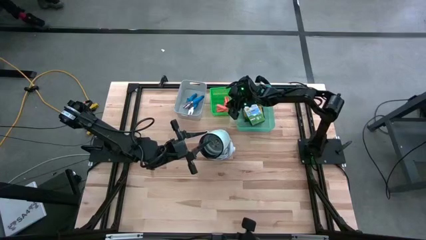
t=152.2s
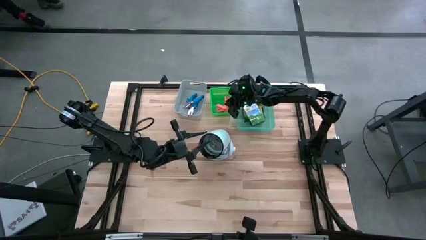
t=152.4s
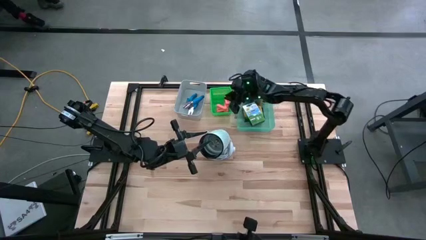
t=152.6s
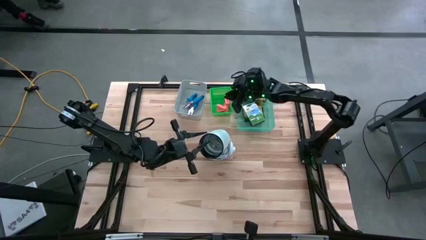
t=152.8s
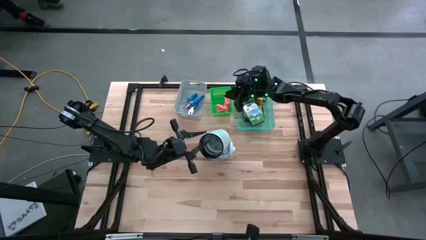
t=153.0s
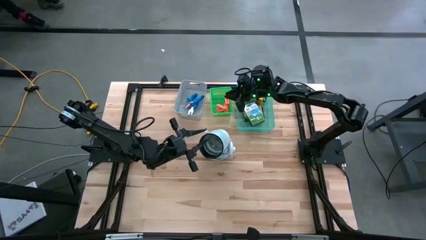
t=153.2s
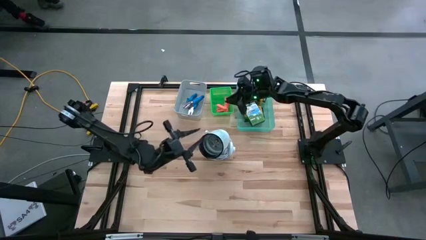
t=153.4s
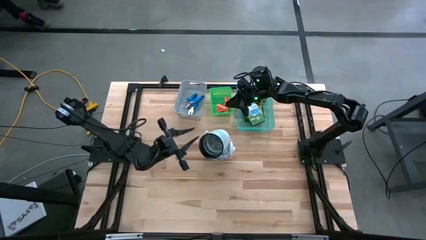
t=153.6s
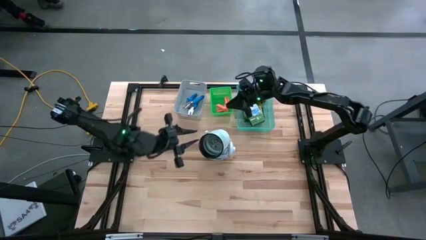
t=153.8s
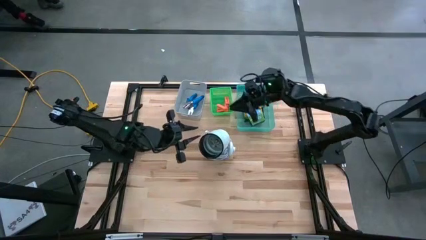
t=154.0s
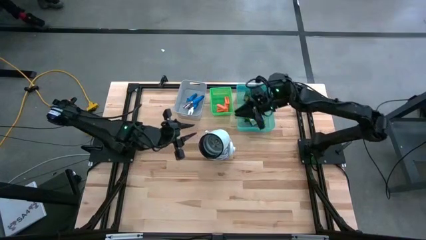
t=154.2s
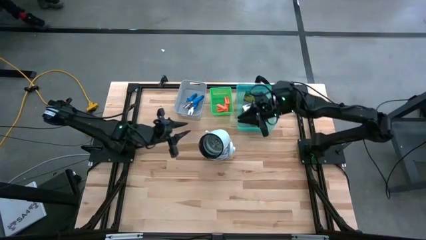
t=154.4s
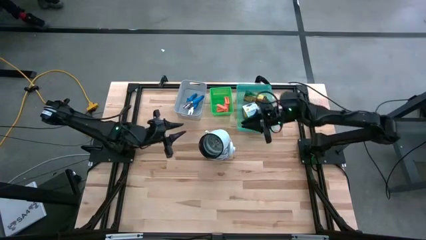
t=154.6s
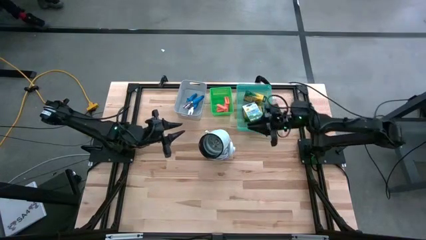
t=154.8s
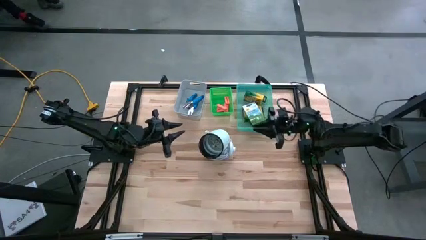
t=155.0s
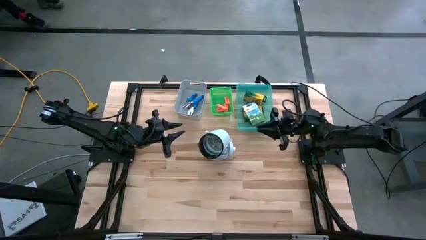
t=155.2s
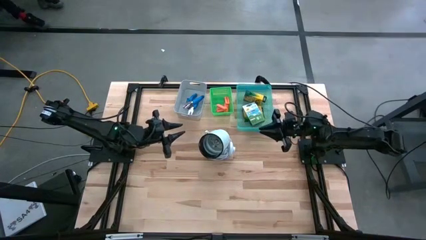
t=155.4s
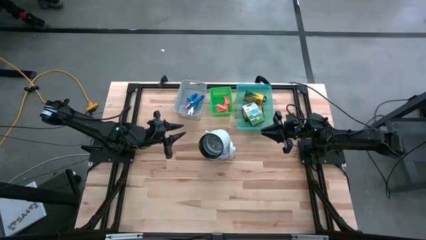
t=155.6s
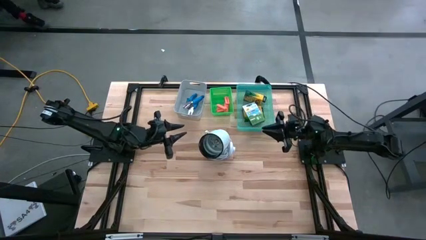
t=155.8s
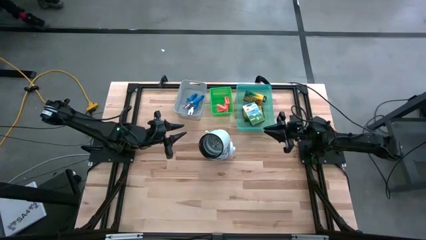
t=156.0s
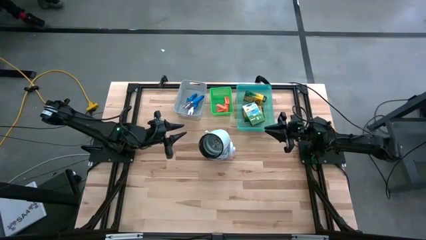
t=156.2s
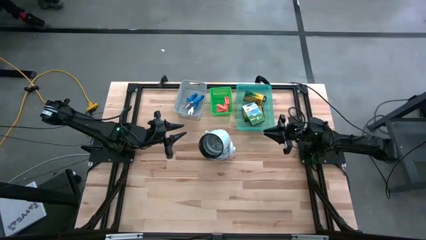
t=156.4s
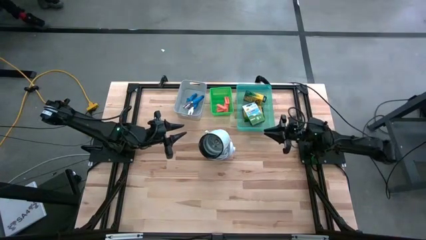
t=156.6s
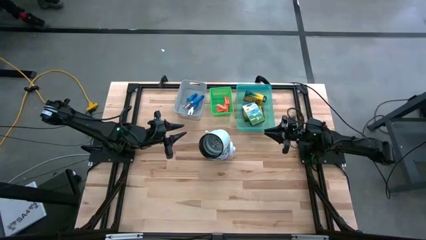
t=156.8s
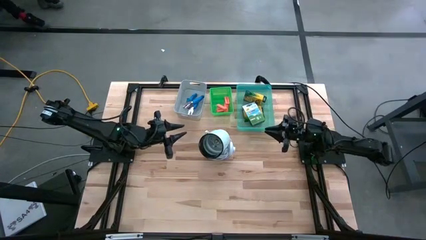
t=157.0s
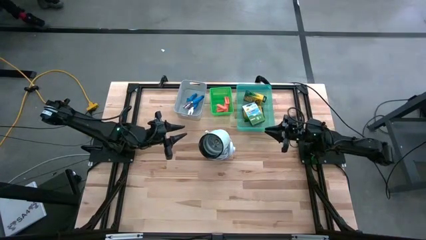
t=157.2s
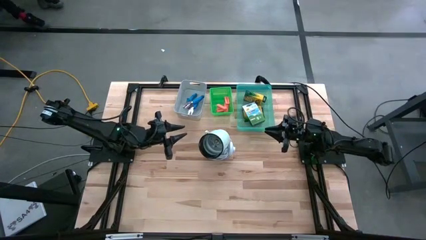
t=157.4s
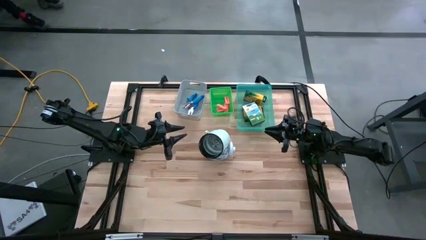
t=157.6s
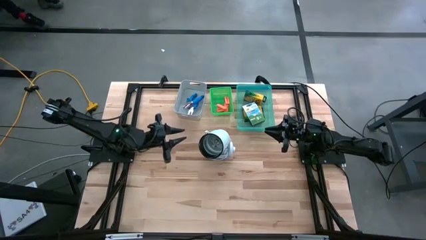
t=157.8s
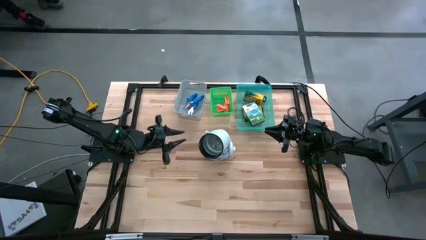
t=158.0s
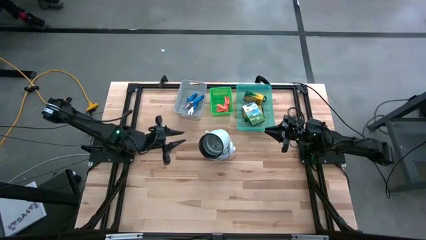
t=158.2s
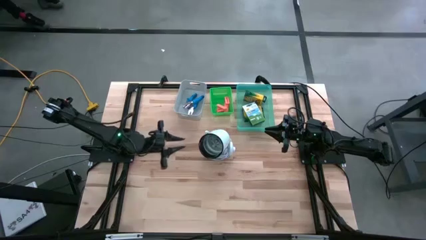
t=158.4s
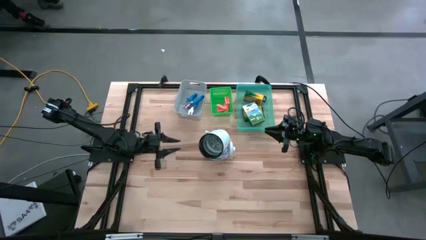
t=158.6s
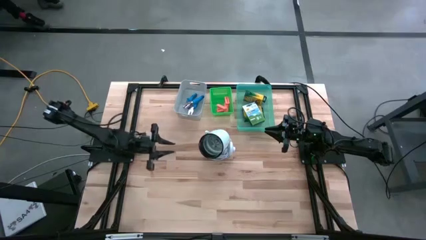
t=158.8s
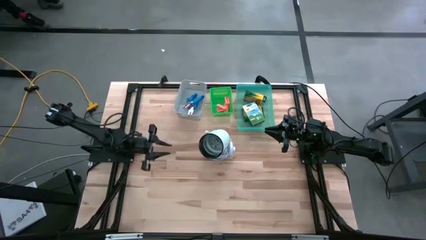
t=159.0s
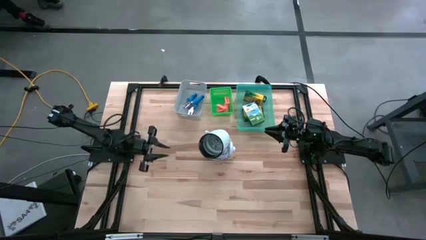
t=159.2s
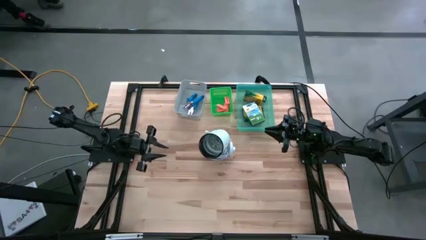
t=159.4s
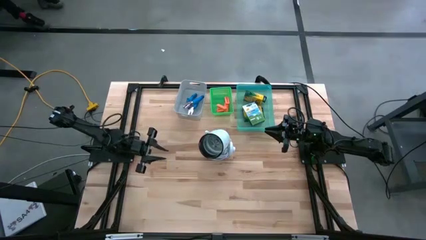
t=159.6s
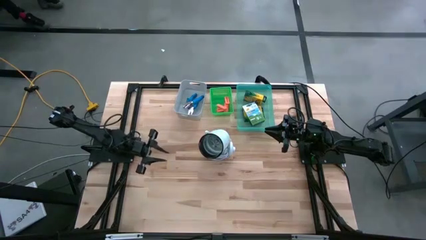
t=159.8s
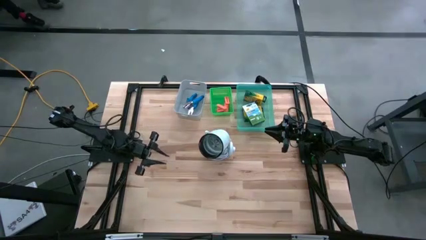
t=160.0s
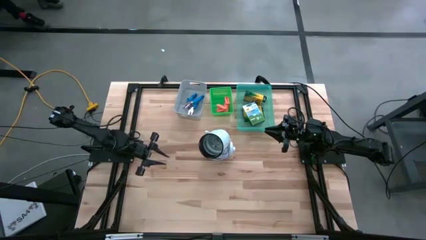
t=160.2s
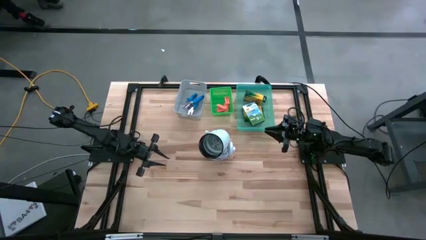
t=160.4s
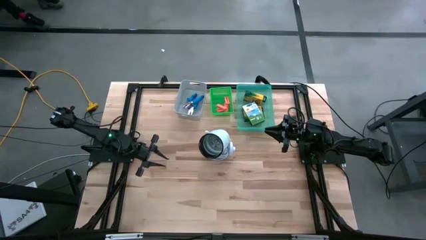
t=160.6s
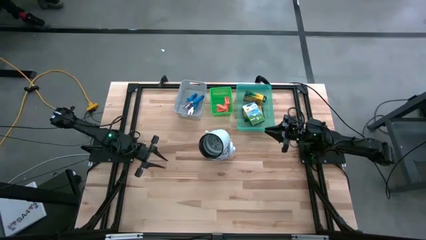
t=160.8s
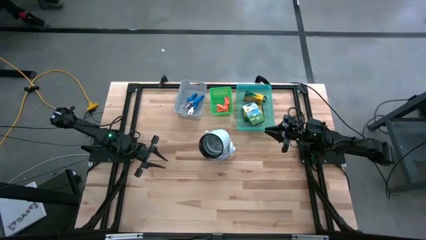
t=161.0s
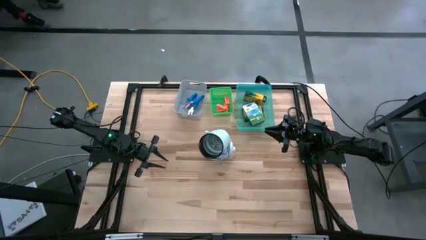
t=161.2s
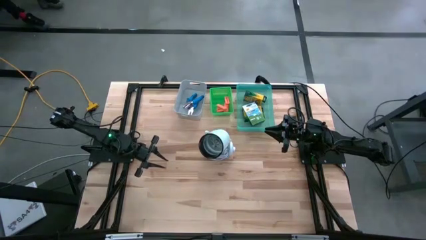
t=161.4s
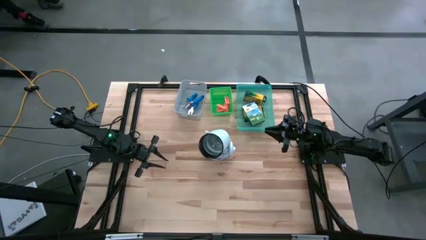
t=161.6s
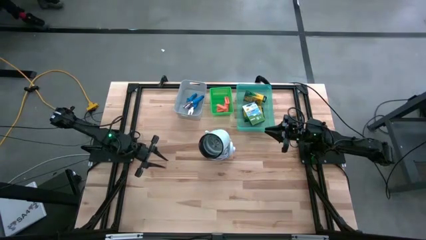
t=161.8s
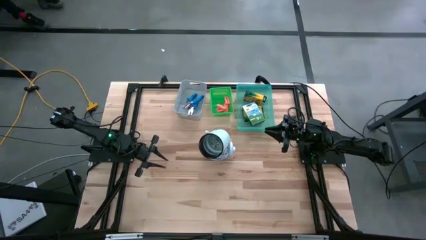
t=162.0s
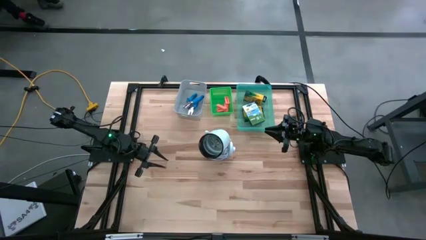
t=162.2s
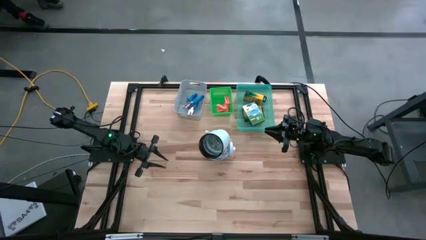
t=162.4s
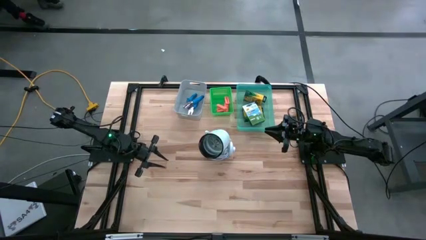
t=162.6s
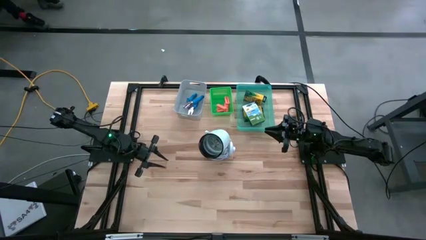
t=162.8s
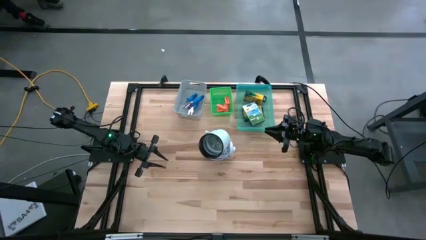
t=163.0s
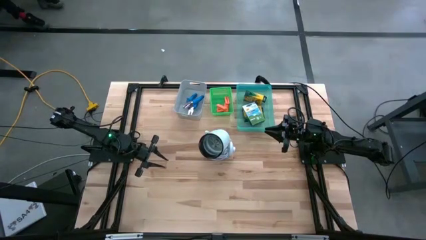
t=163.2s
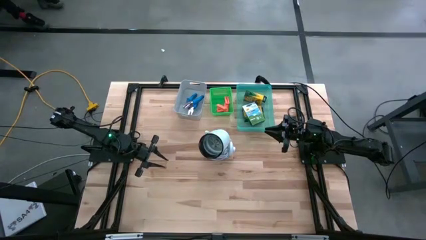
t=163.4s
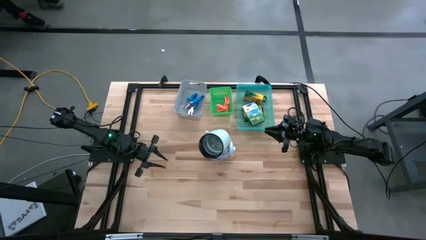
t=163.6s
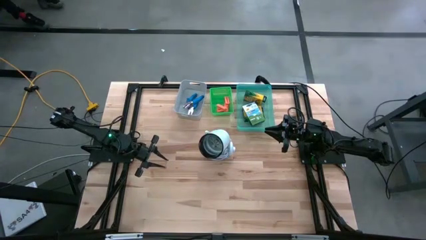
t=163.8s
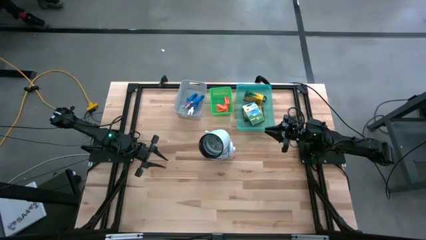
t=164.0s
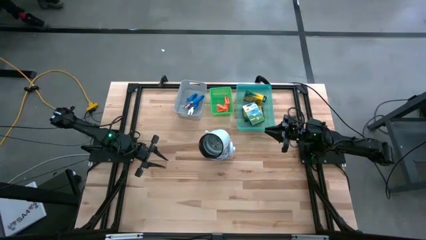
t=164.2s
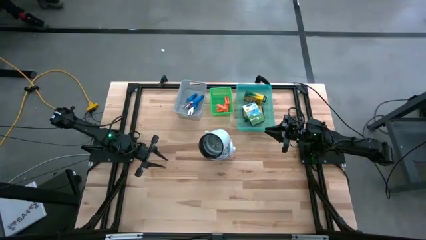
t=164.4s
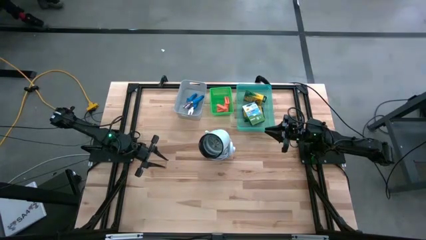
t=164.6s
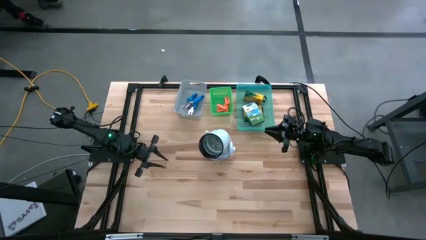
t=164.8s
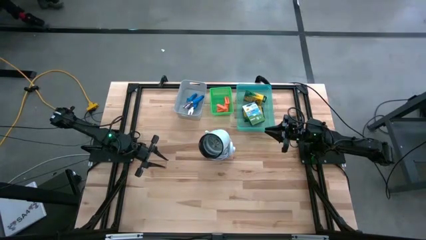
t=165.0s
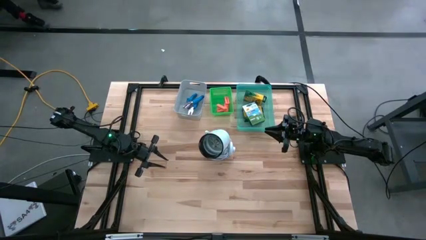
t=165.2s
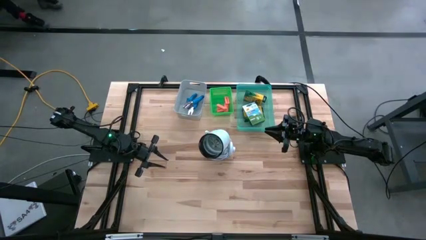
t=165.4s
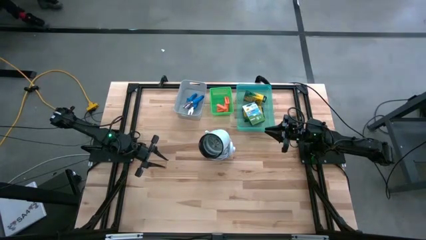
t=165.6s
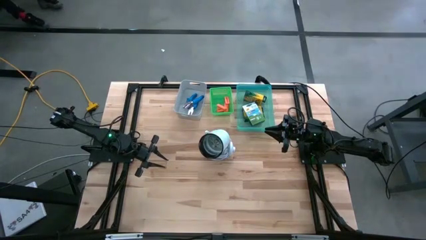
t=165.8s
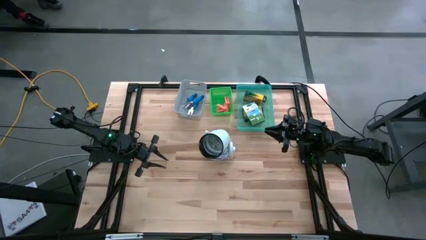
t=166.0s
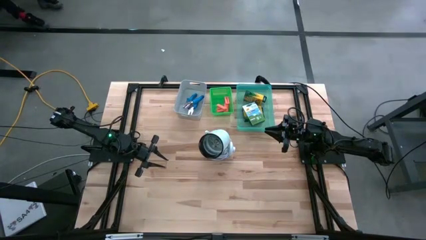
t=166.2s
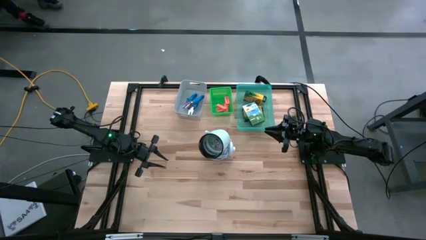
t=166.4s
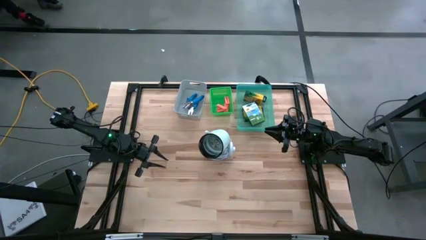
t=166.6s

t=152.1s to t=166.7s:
Task: Pick & Place School Supplies
Return to Home Position

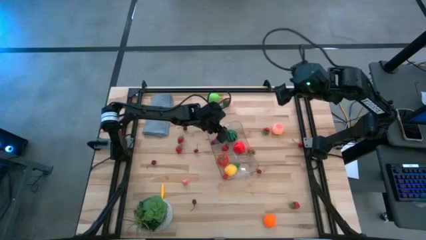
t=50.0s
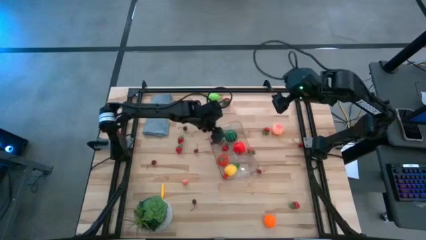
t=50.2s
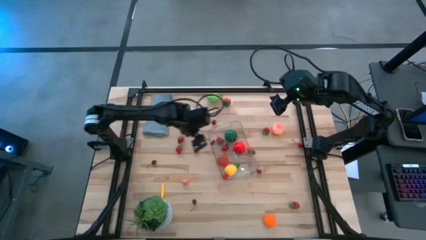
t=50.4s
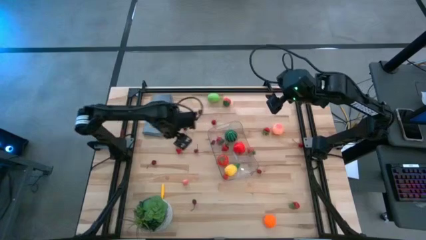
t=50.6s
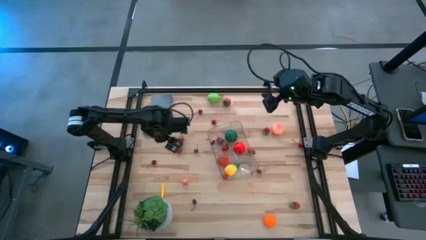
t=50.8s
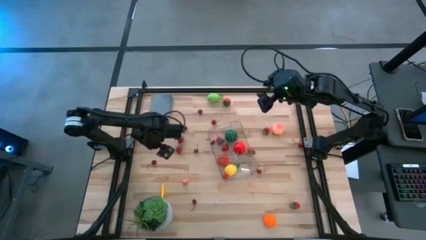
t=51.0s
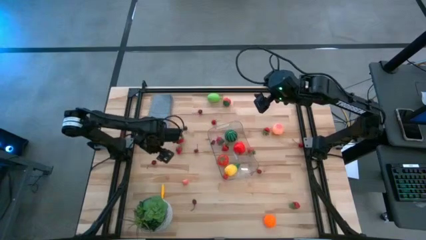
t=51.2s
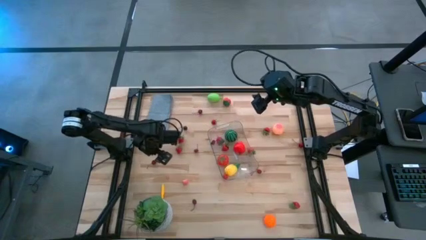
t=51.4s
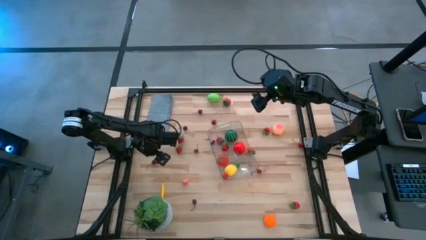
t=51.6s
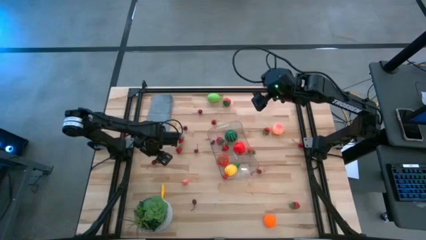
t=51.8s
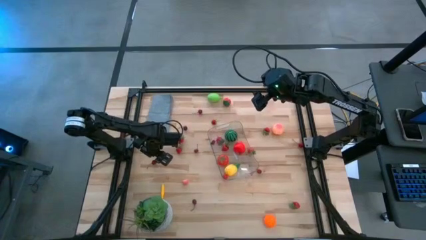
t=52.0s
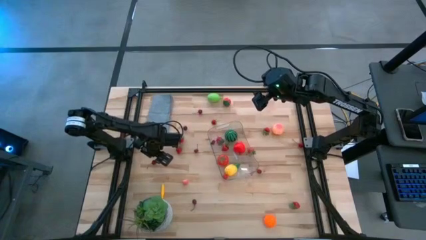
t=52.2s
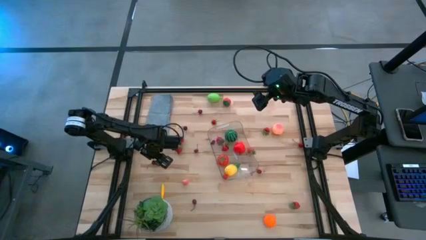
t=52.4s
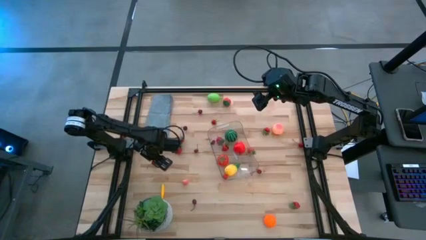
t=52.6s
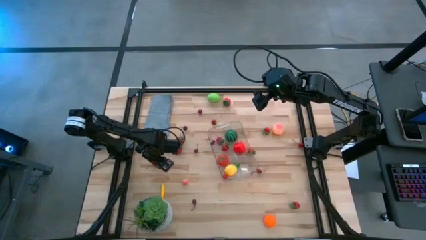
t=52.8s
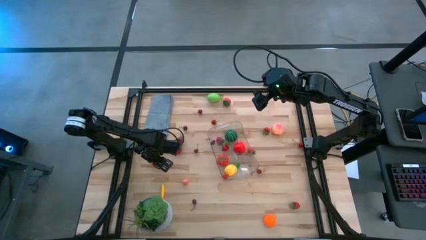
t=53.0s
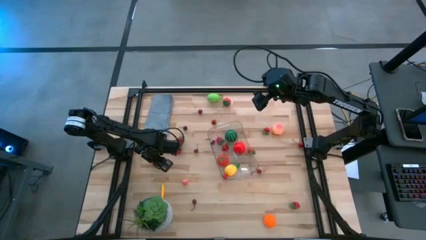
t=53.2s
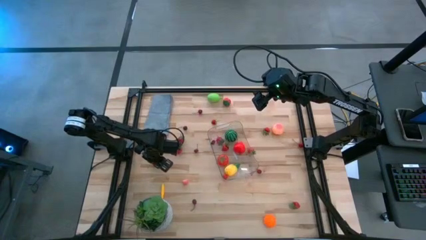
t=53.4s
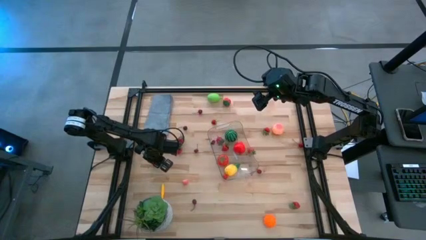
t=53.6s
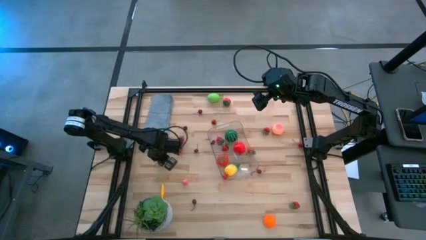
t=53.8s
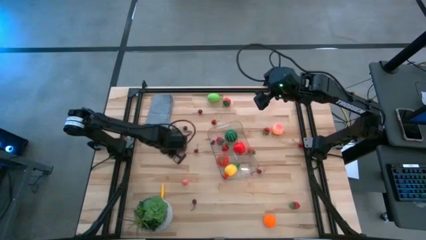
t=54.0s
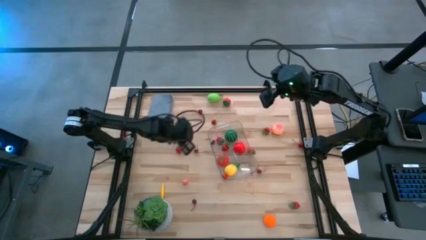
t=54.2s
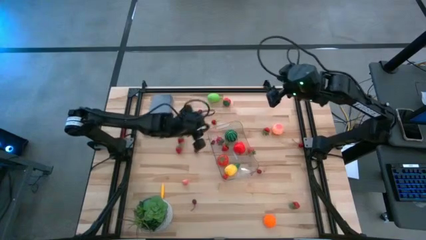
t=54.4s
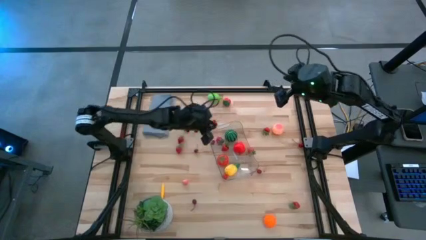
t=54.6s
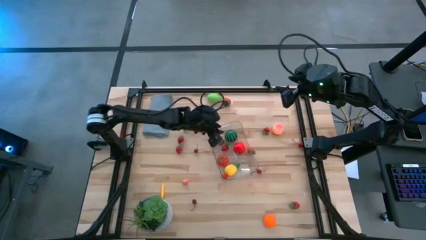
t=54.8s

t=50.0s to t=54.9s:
Task: Pick and placing Produce into tupperware
Put the red cherry into the transparent bin
